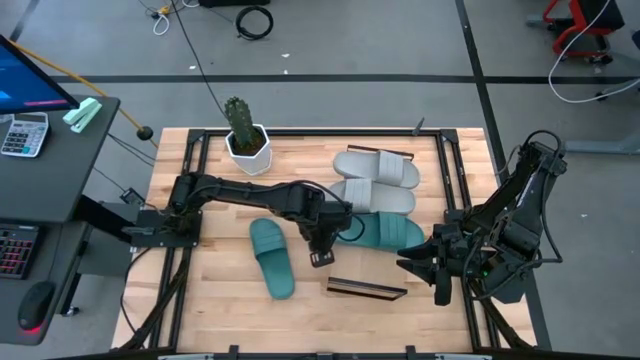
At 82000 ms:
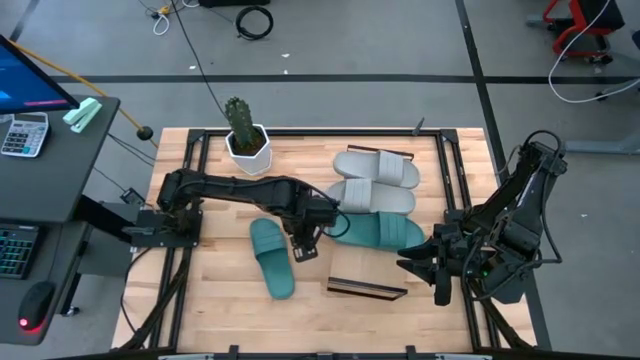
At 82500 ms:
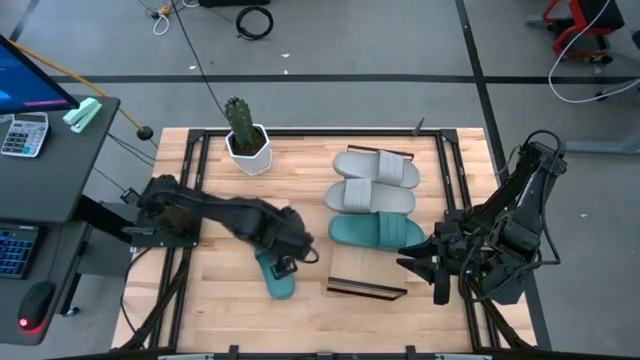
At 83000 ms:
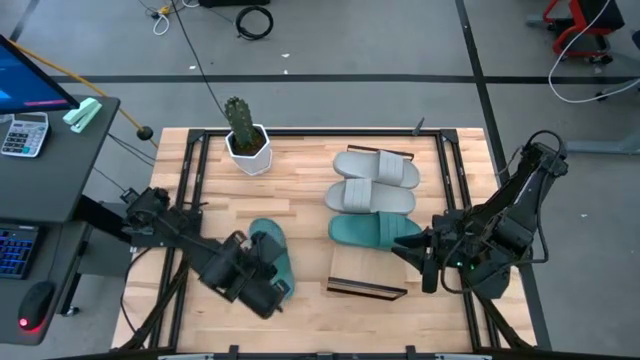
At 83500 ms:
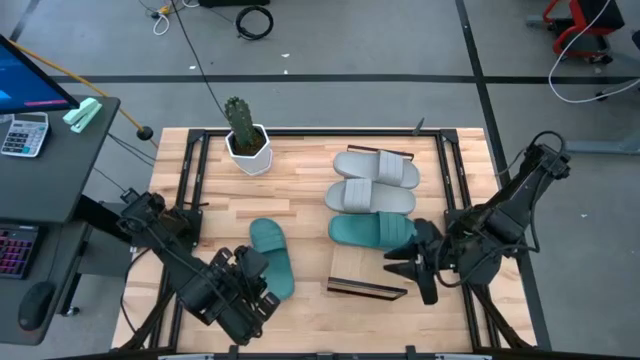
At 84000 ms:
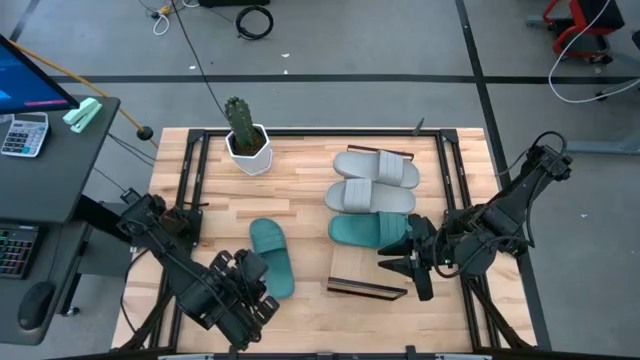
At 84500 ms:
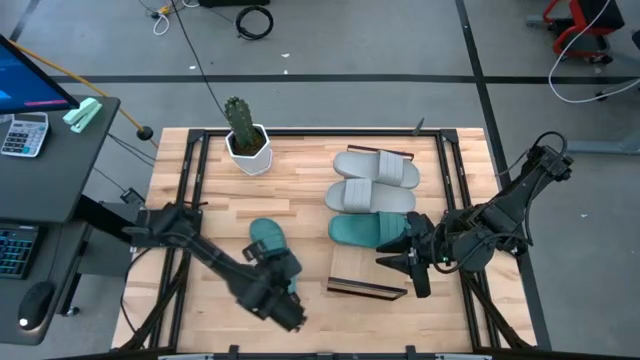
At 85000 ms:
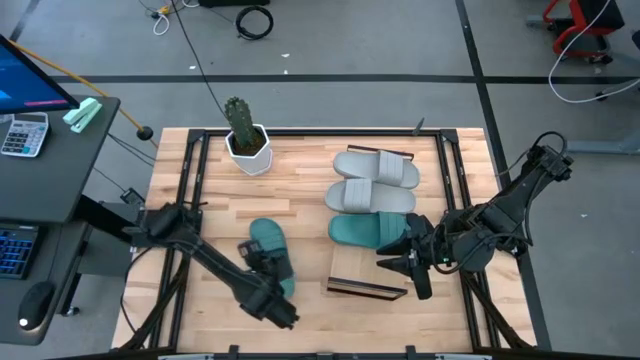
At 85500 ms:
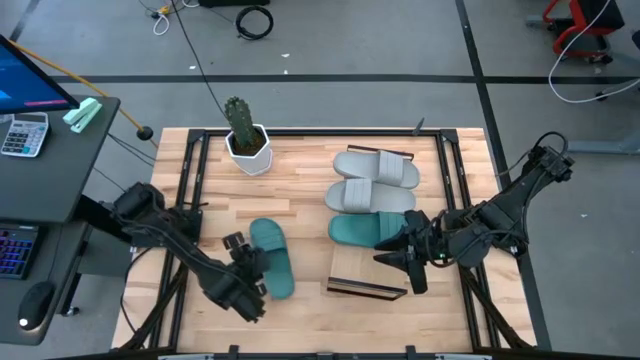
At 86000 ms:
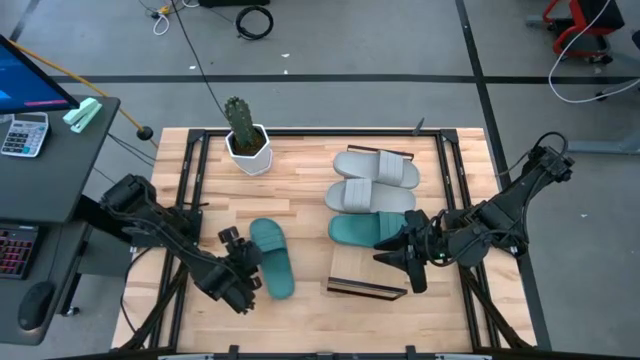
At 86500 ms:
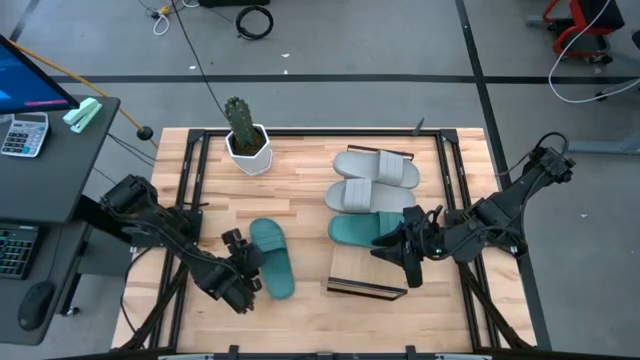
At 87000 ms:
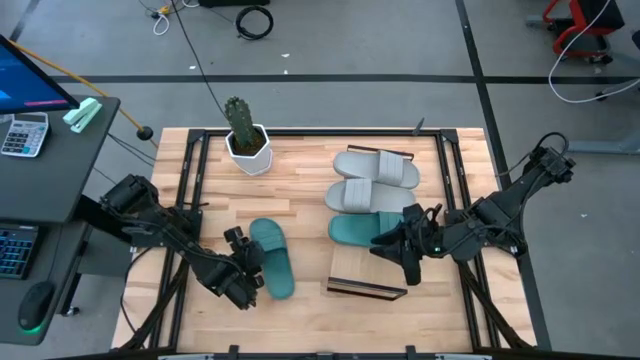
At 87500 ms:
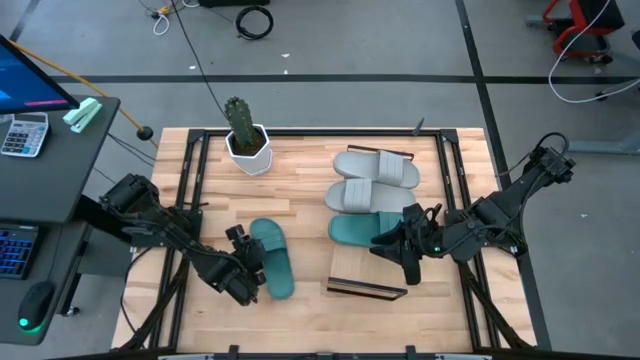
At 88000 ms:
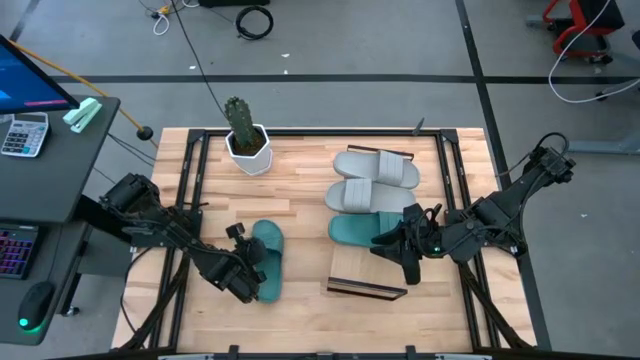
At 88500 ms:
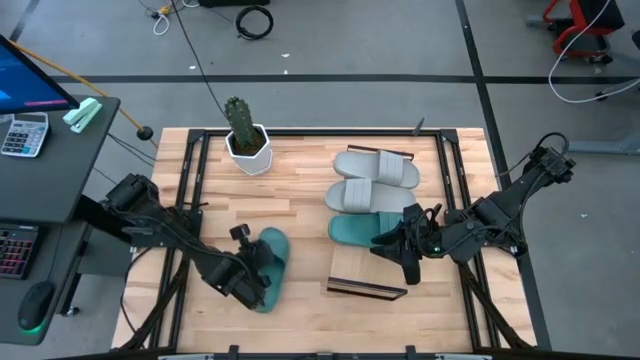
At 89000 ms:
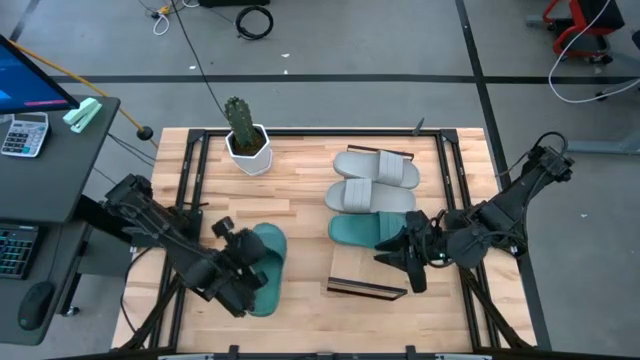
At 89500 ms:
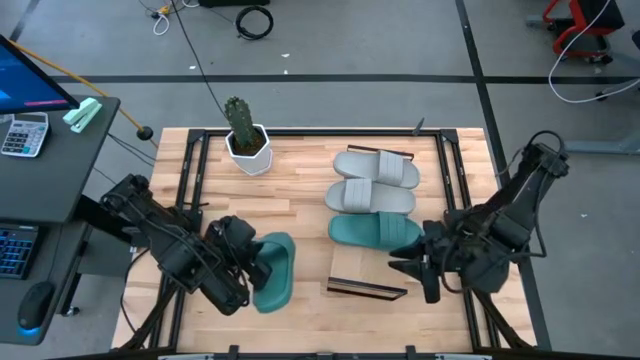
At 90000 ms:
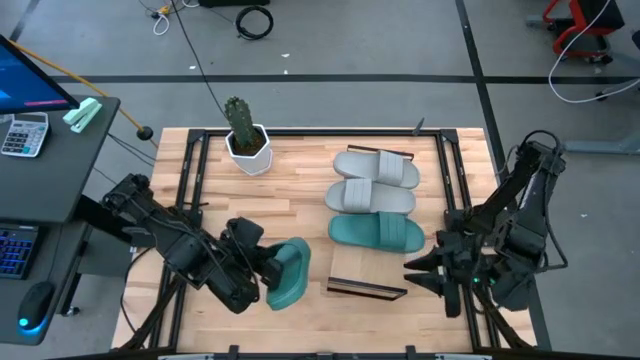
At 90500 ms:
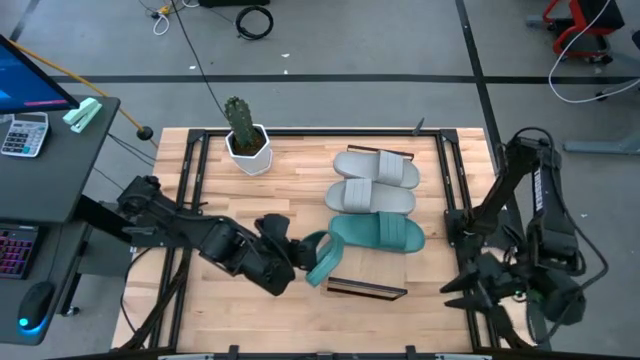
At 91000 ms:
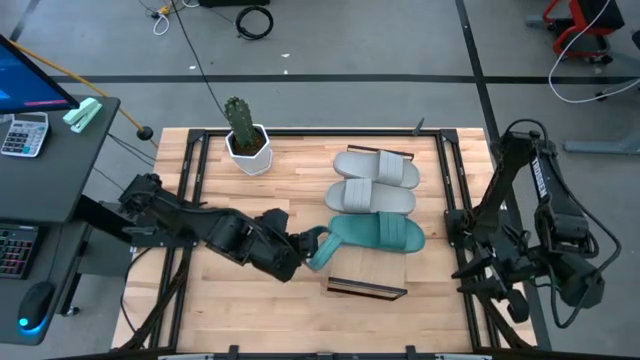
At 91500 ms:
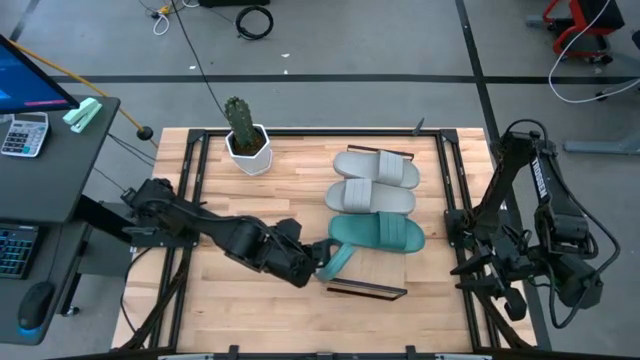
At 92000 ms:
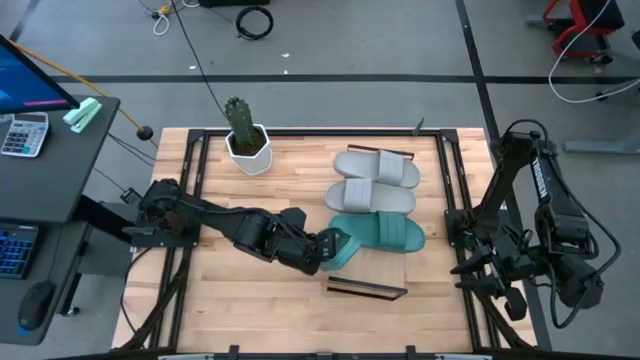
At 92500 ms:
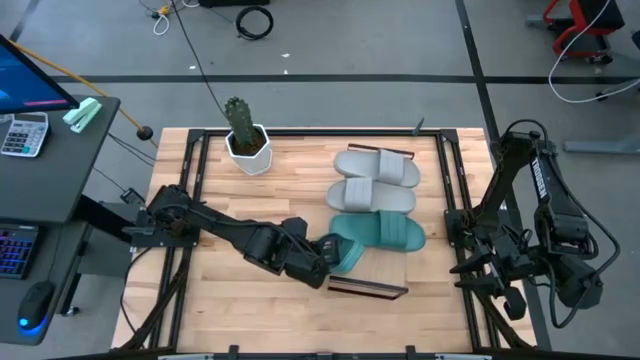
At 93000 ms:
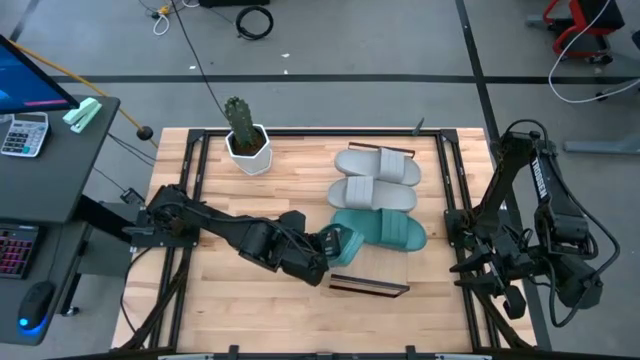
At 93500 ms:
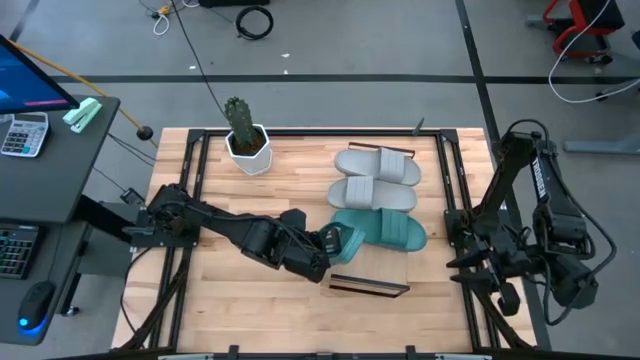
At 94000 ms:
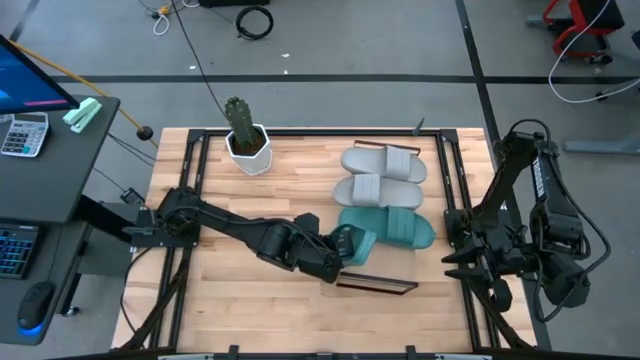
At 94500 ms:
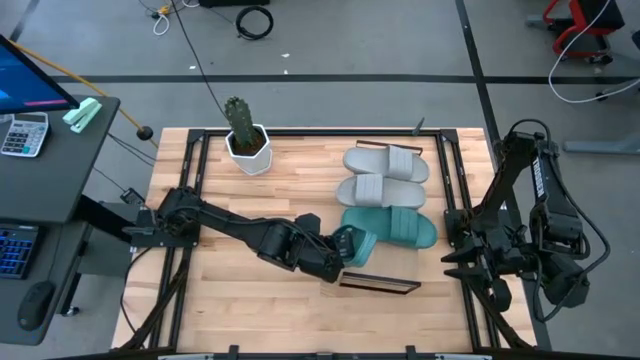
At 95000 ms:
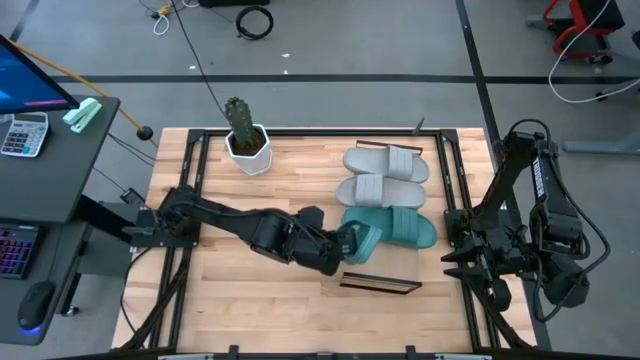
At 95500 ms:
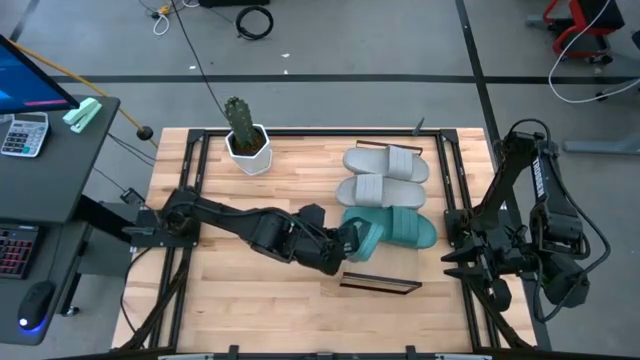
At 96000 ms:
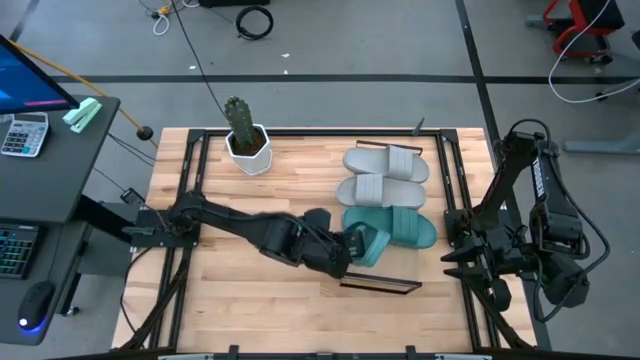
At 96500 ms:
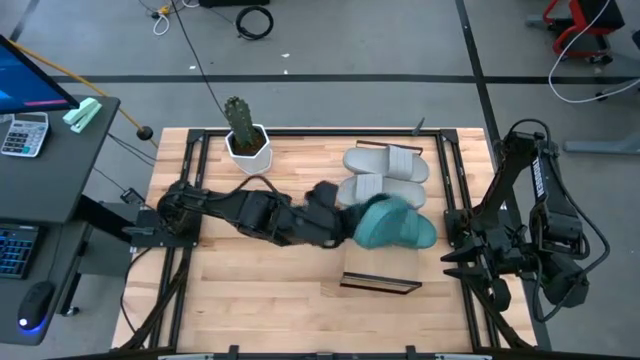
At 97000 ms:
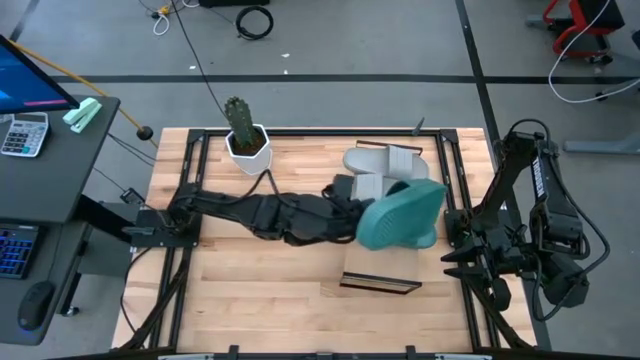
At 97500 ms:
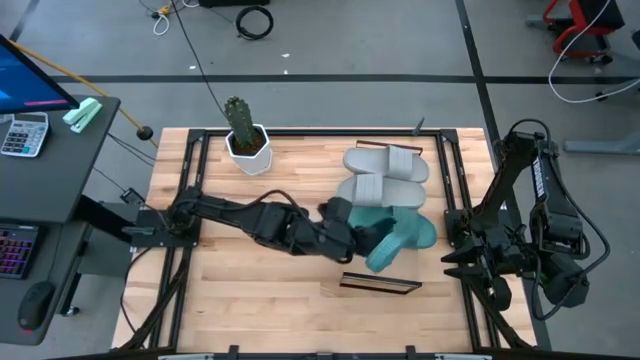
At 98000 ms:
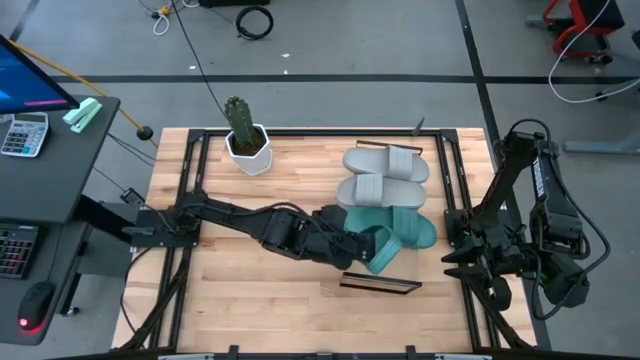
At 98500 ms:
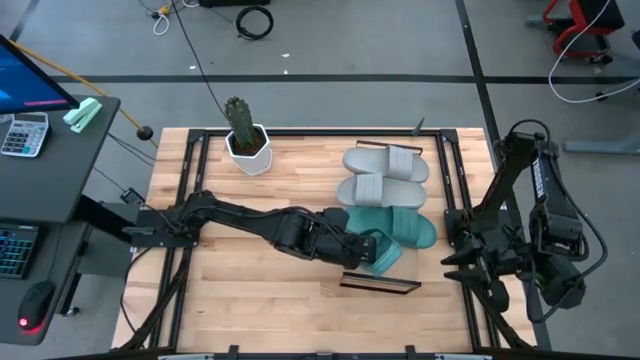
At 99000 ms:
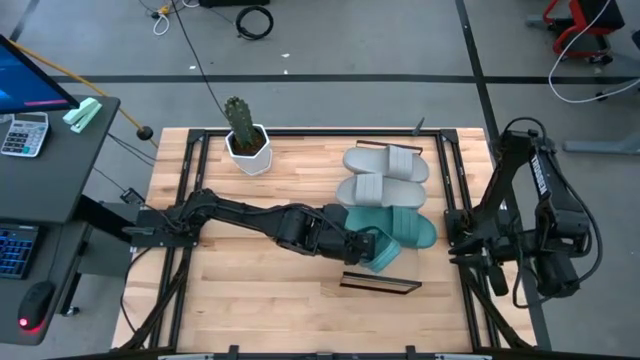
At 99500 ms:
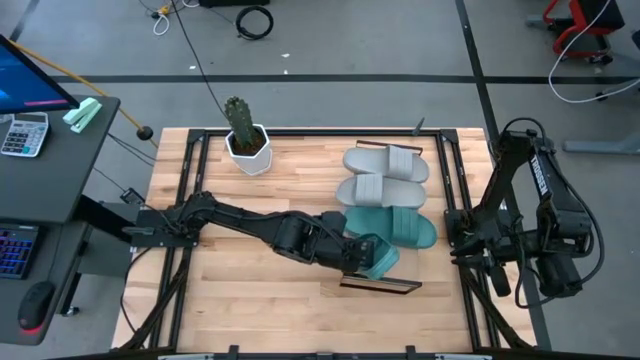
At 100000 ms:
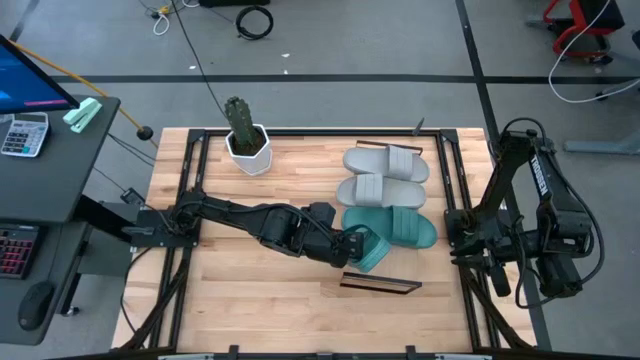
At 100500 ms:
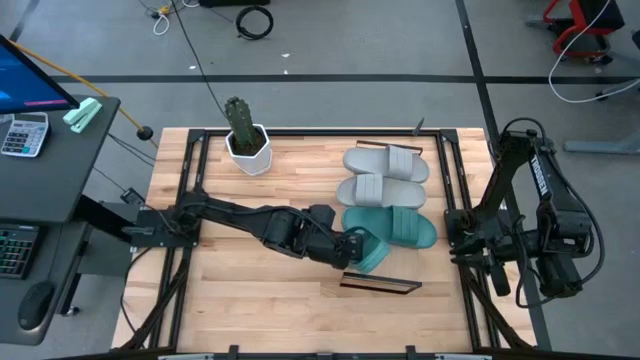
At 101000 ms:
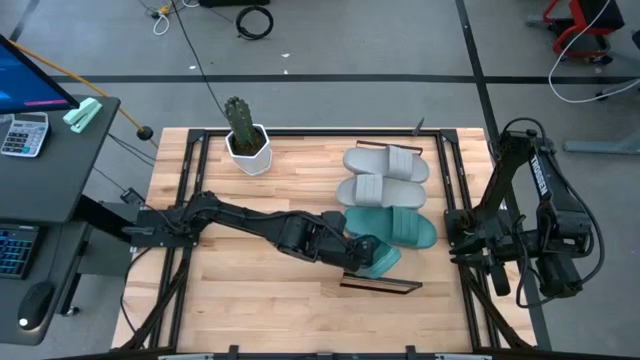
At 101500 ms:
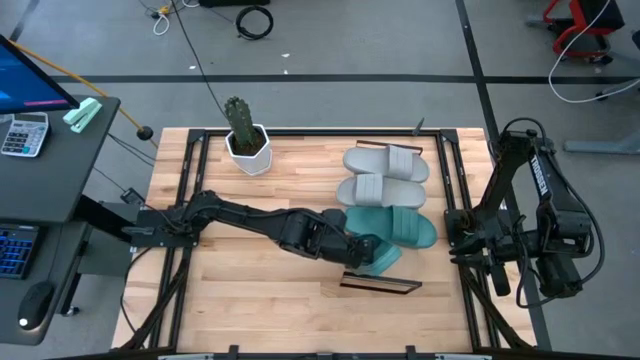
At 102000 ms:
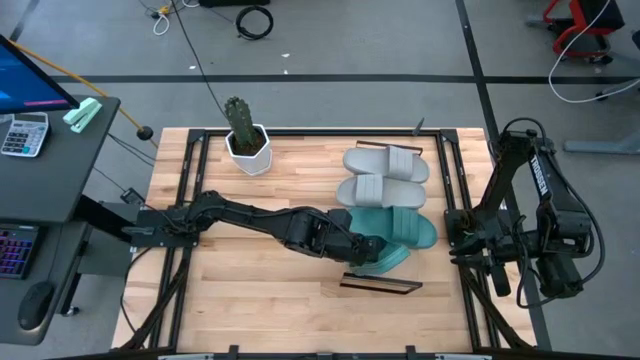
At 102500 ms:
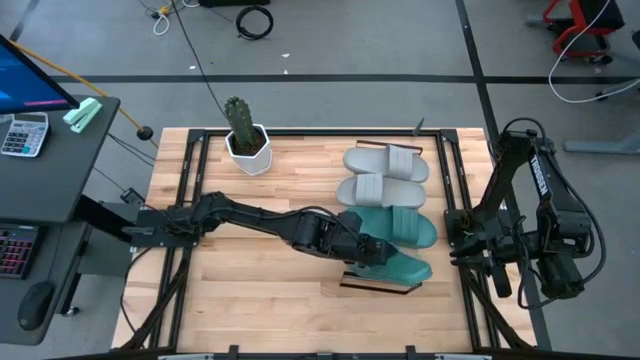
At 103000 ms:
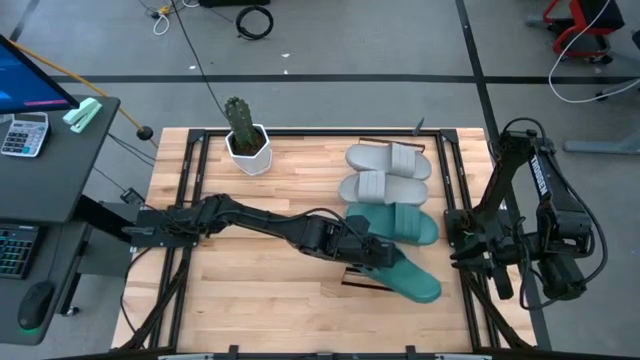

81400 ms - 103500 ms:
Task: Pick and place slides into the shelf
Put the green slide on the shelf
